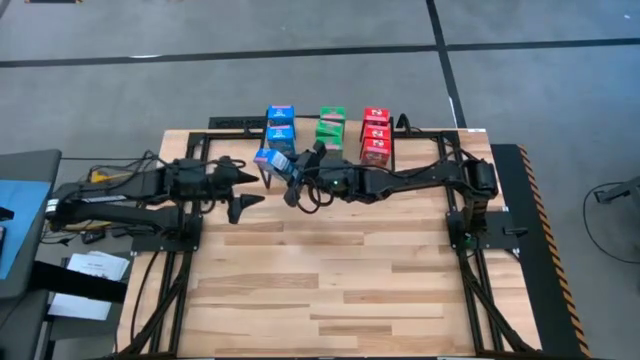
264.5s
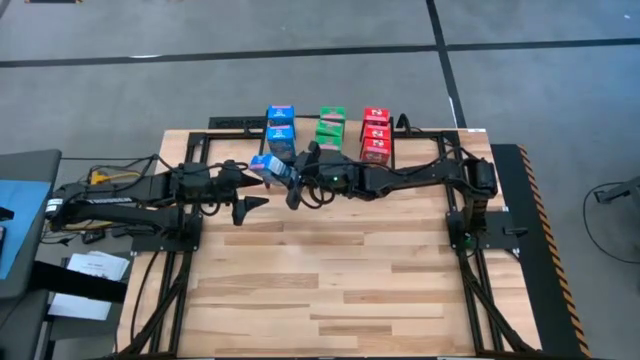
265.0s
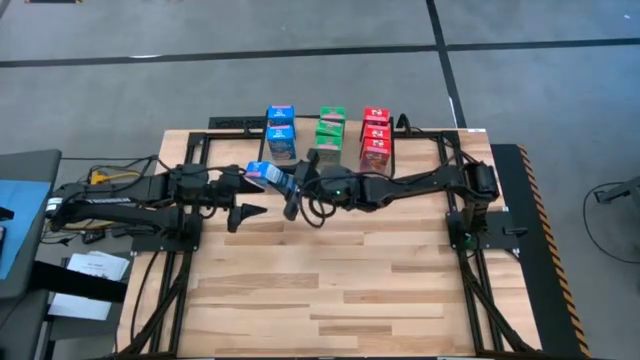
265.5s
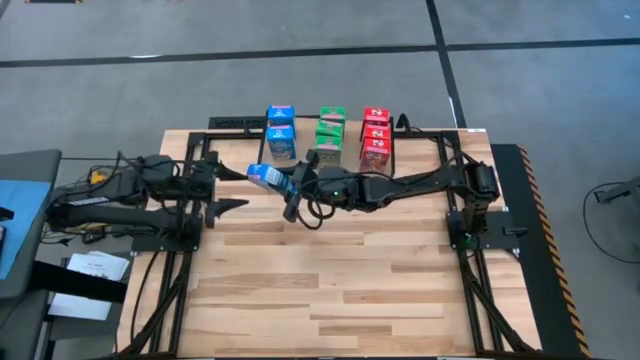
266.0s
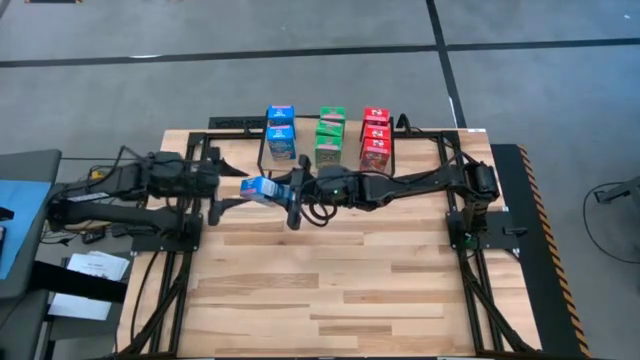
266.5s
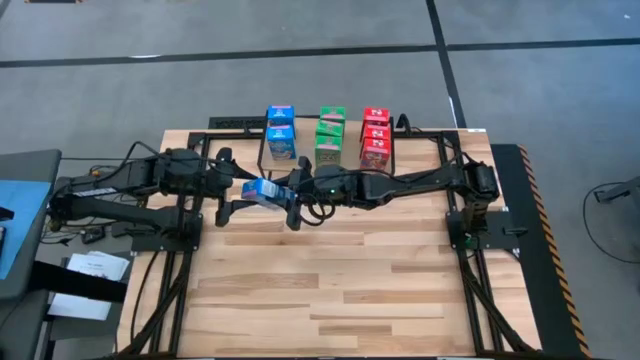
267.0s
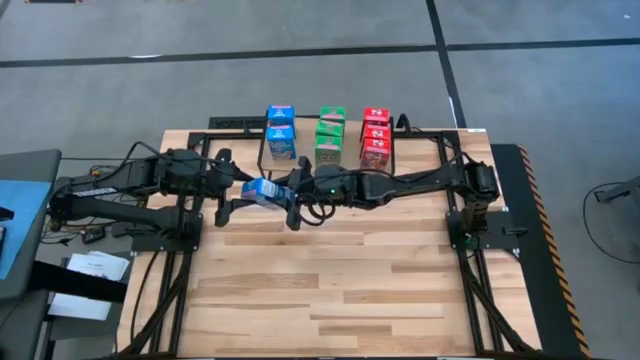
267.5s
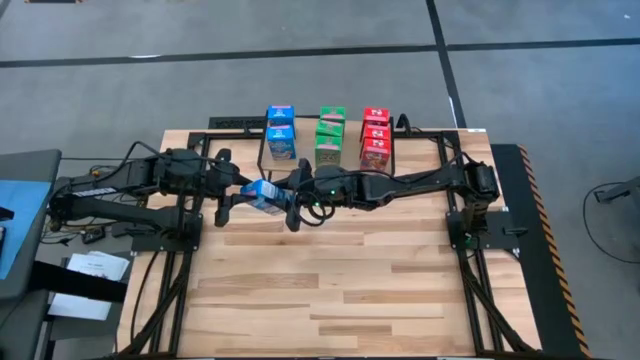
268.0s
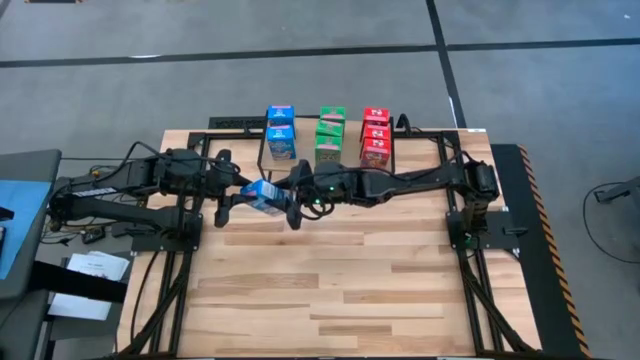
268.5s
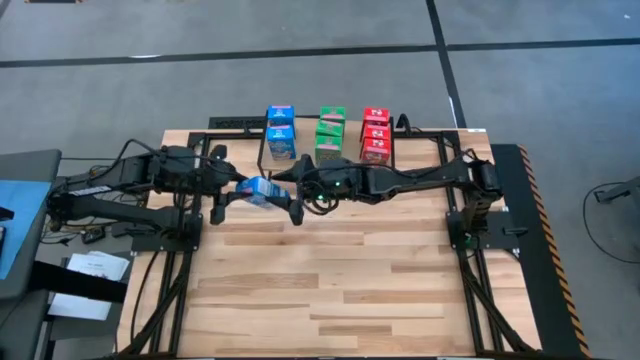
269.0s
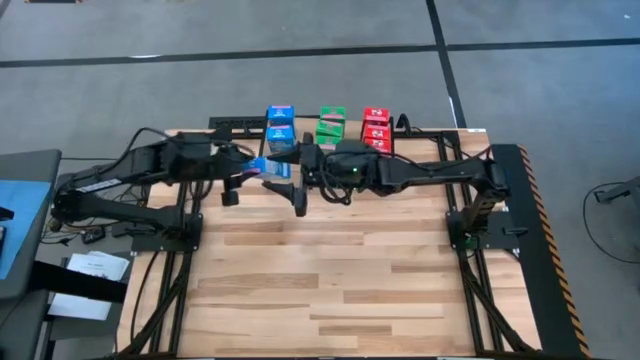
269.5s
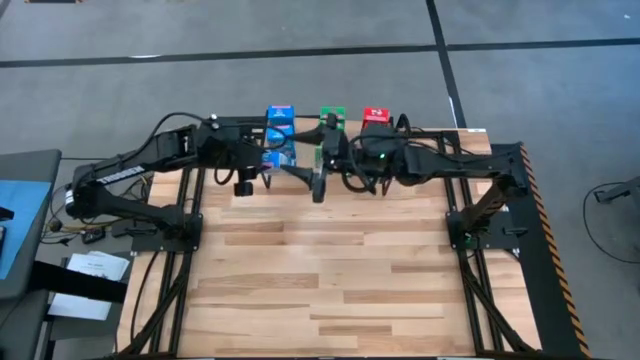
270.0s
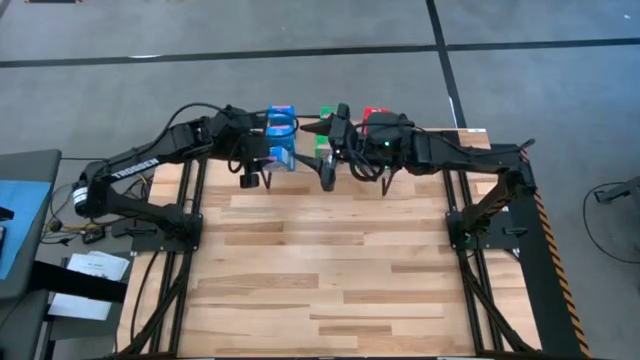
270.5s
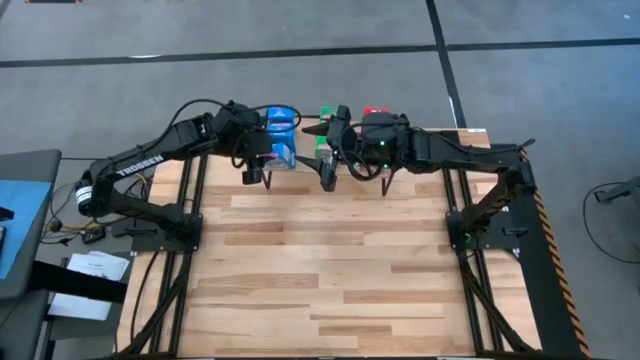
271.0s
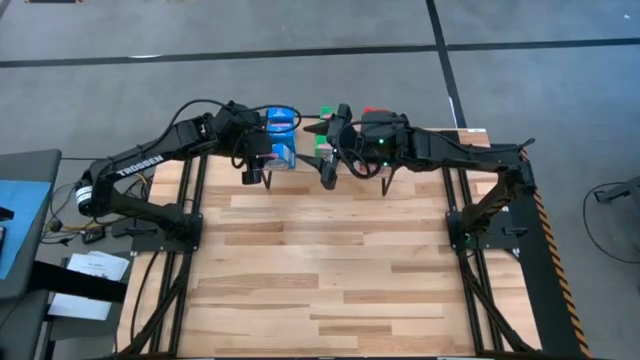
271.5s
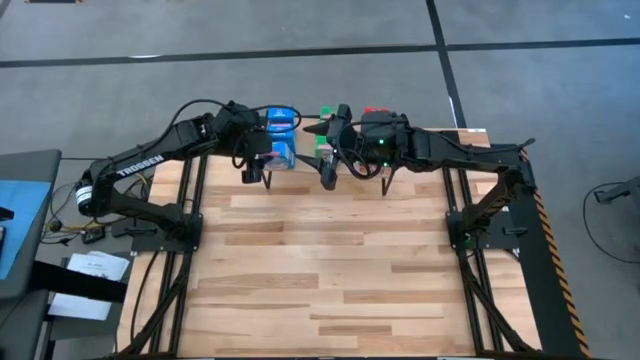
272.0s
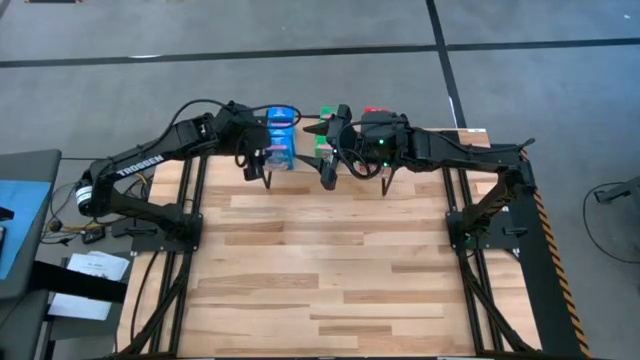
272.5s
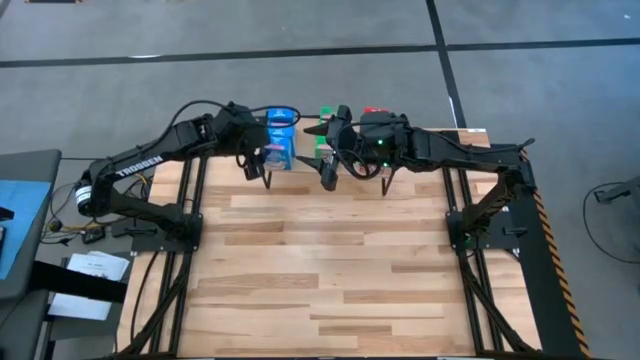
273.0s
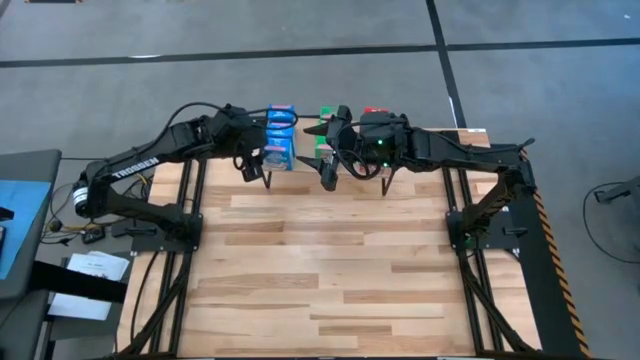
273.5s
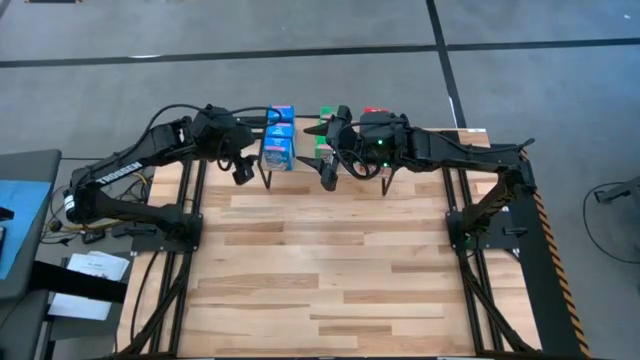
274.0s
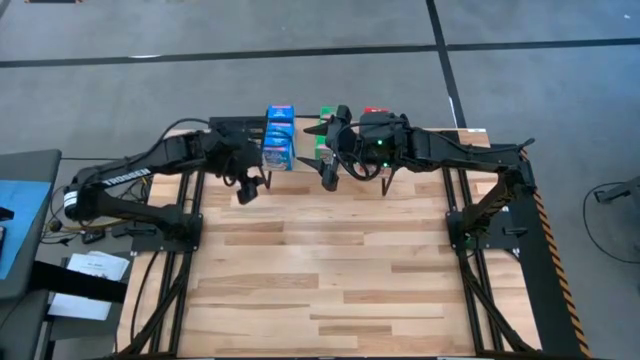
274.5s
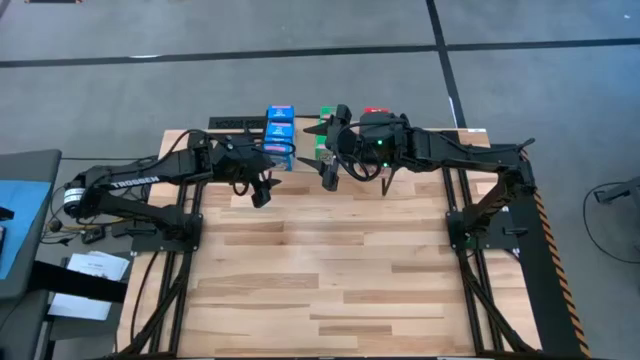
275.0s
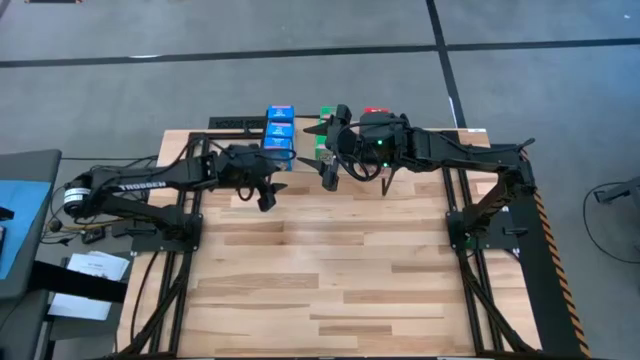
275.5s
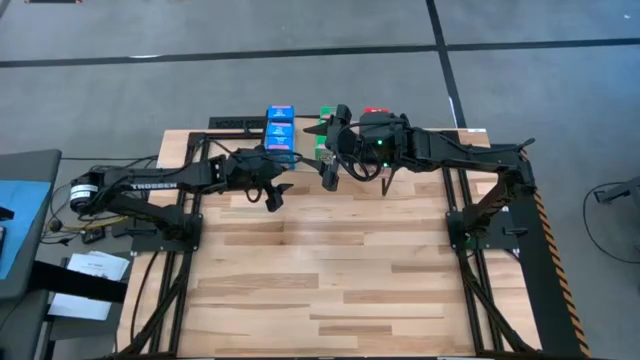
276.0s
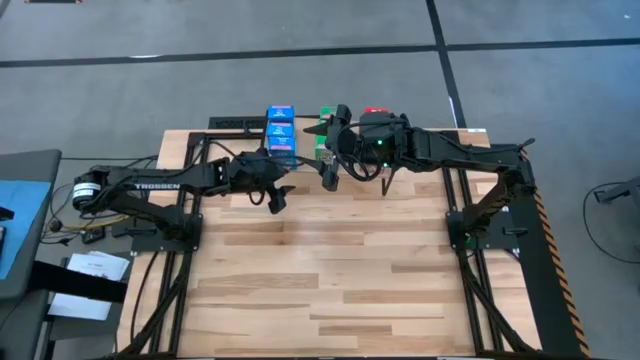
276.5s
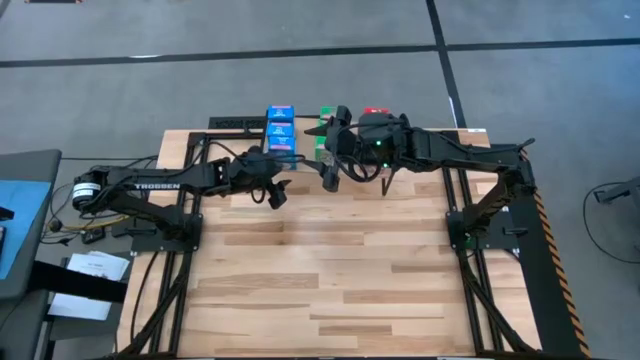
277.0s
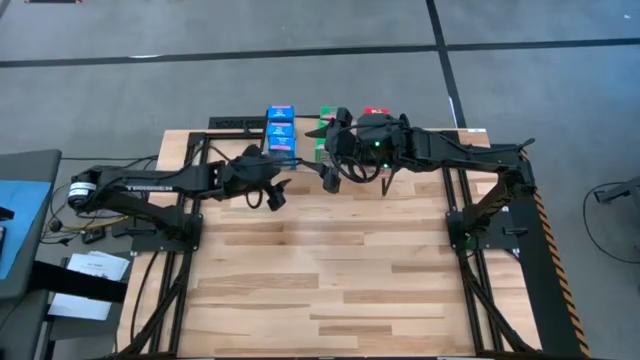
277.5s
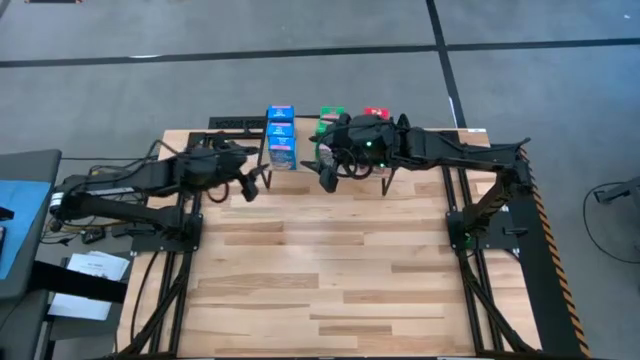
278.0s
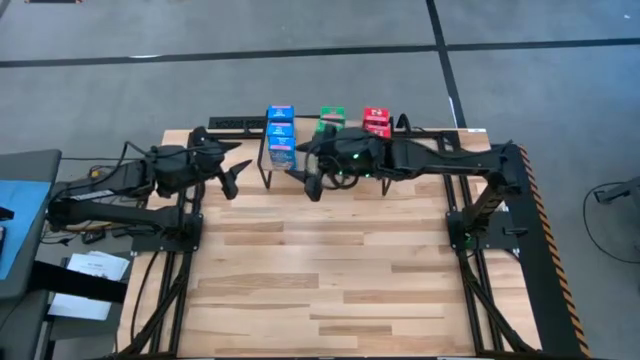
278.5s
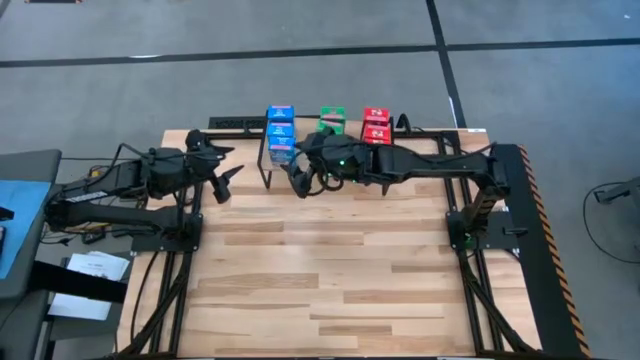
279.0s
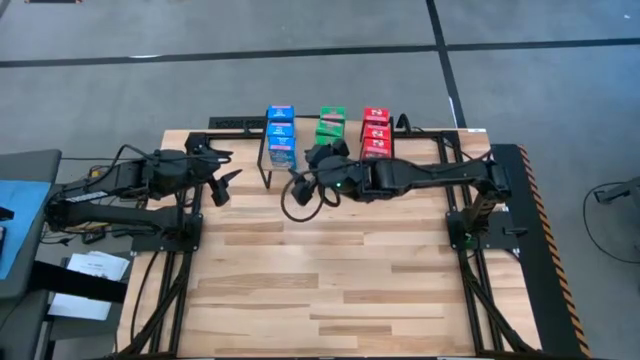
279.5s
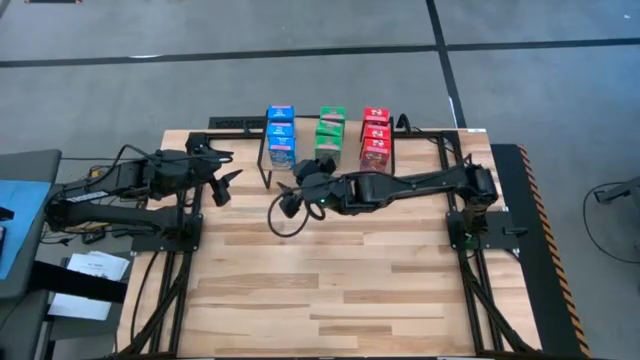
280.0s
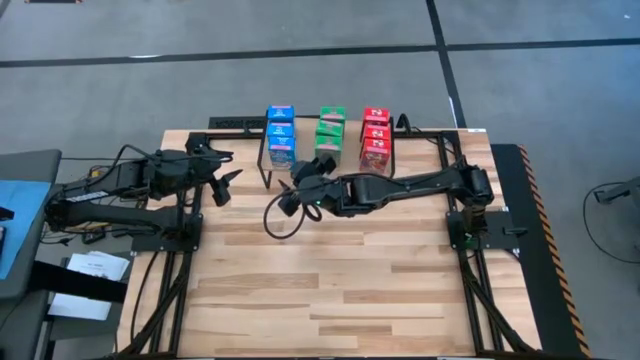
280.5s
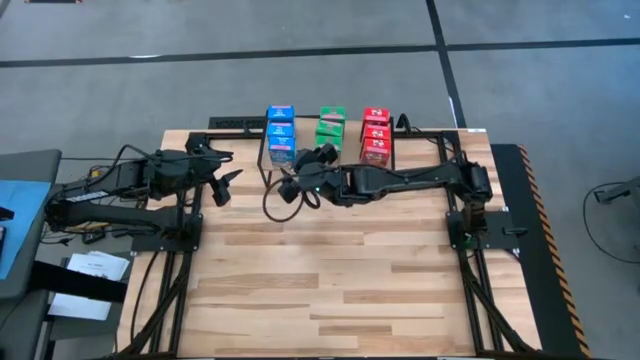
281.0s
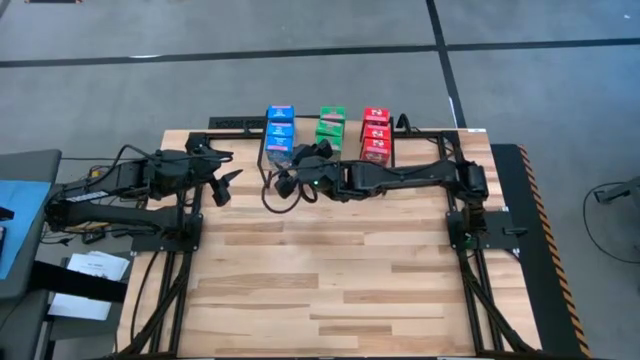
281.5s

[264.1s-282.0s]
Task: Stack cereal on shelf
Put the blue cereal box on the shelf aligned with the other blue cereal boxes

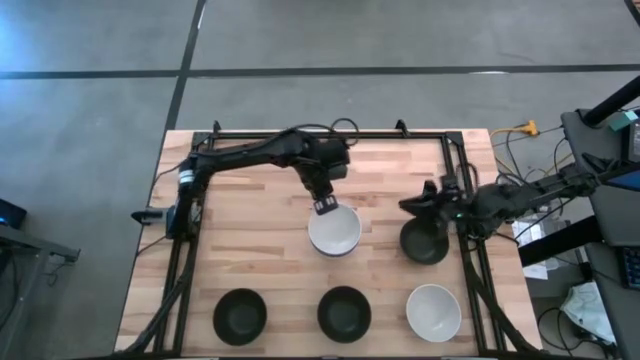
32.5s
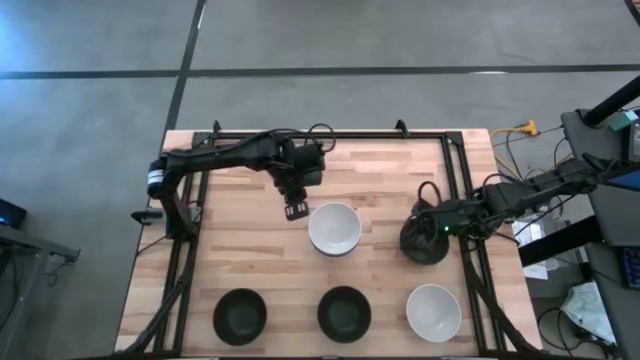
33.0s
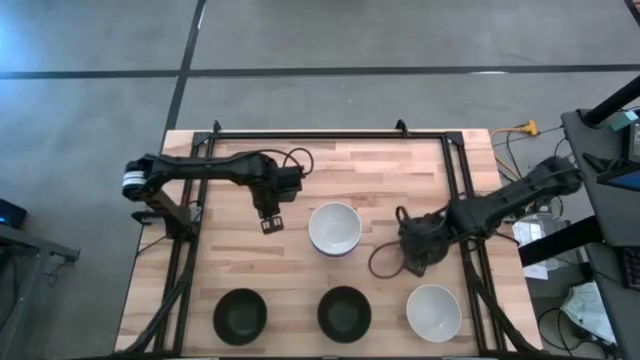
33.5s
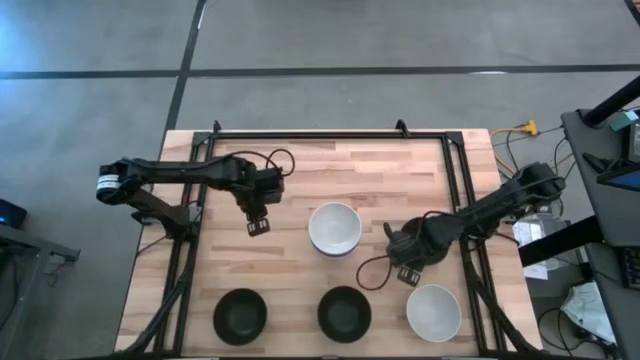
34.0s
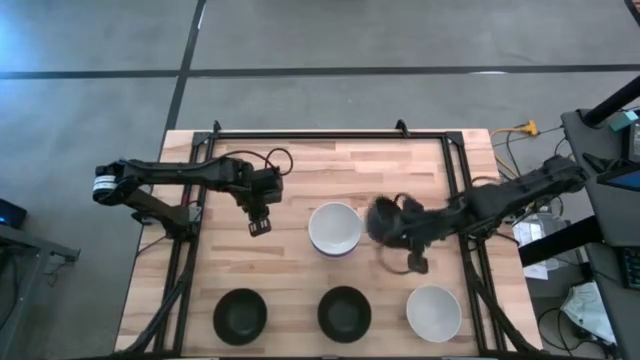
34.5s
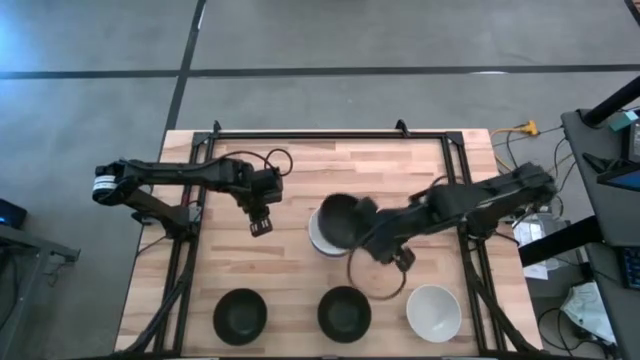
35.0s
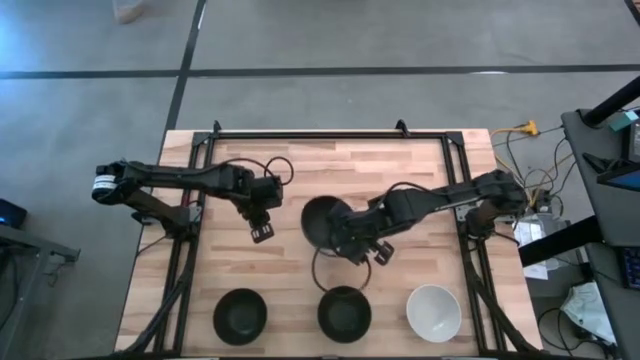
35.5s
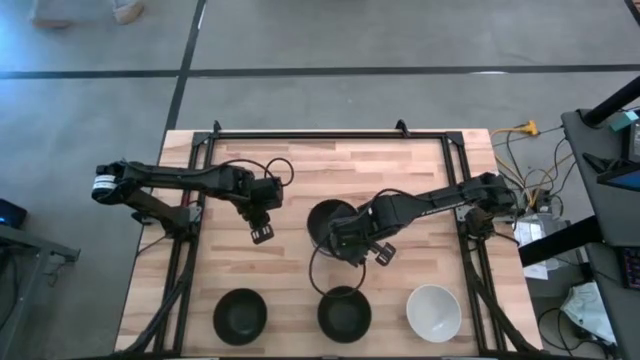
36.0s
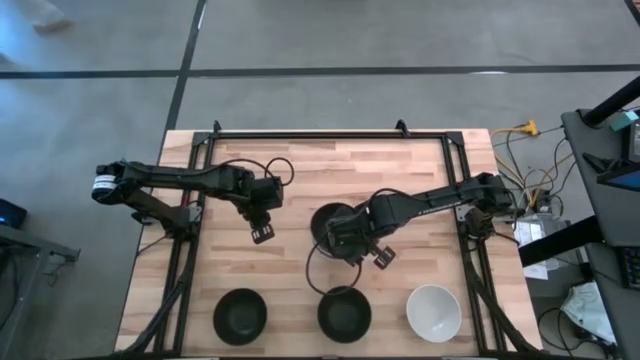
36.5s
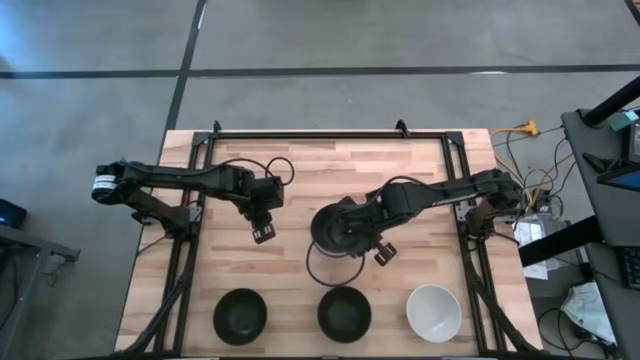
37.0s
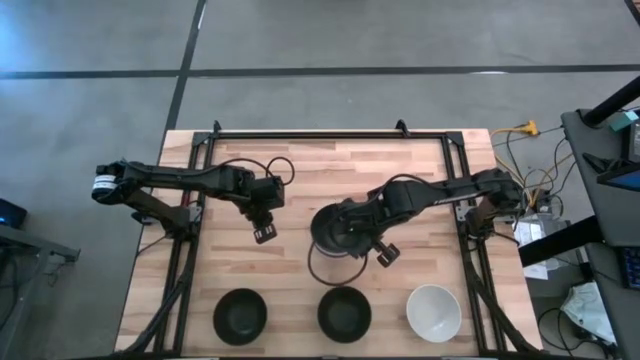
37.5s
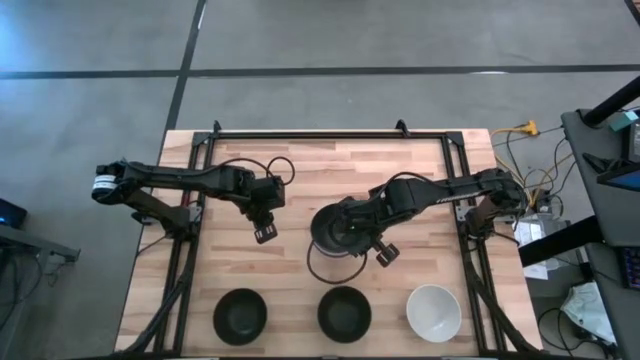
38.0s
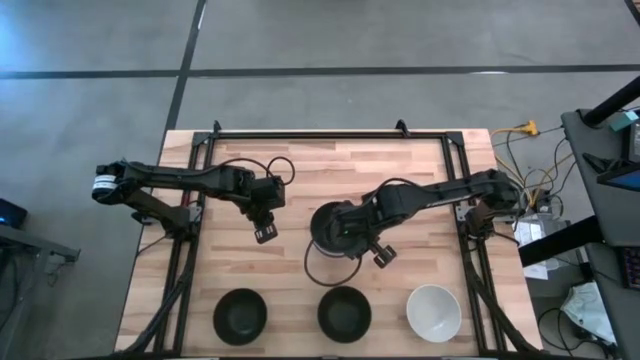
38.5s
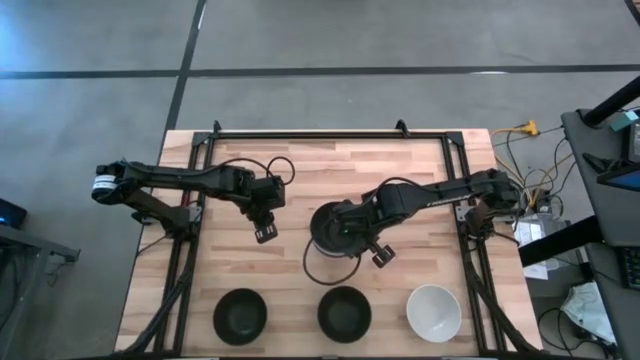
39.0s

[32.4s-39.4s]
Task: Nest bowls inside each other
Stack the black bowl on the white bowl
